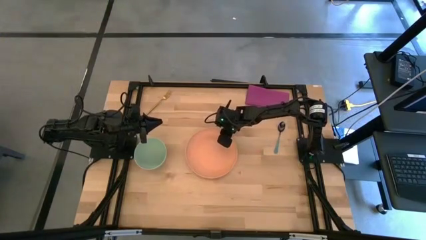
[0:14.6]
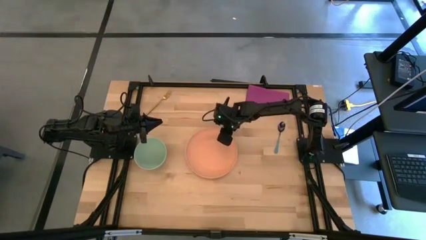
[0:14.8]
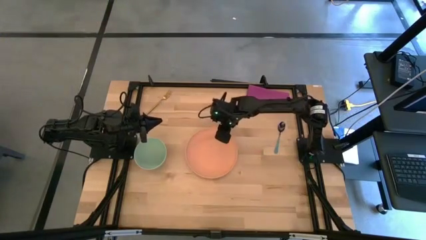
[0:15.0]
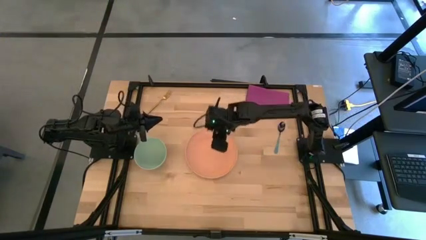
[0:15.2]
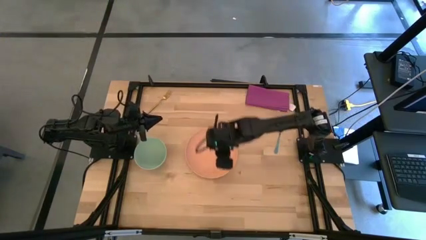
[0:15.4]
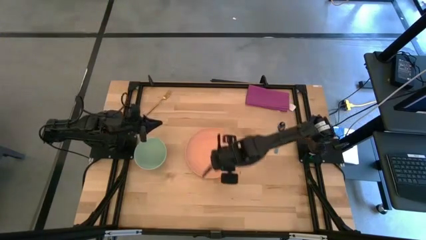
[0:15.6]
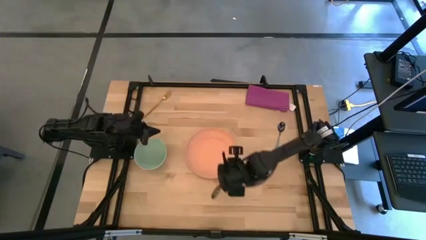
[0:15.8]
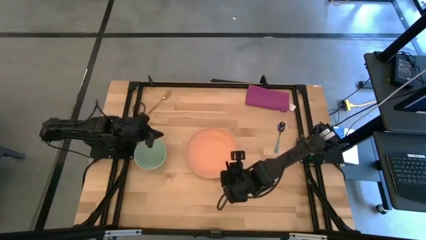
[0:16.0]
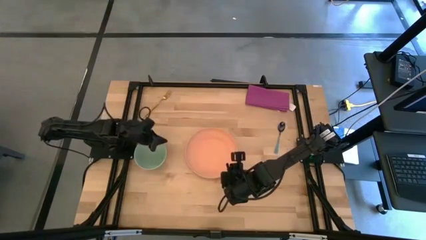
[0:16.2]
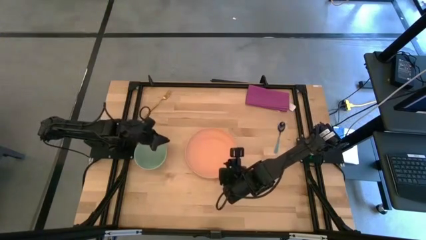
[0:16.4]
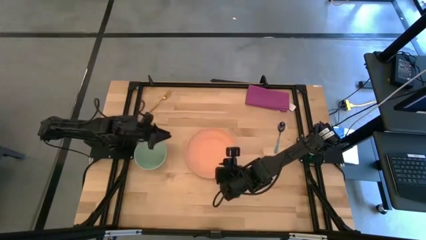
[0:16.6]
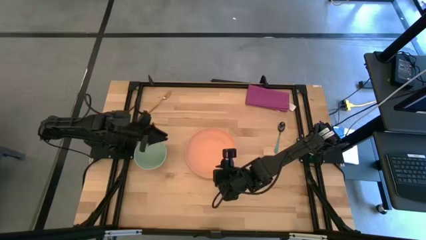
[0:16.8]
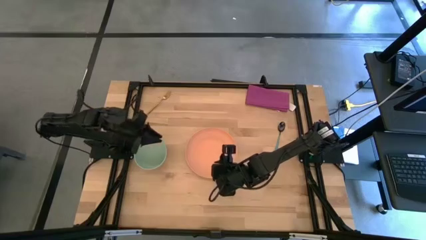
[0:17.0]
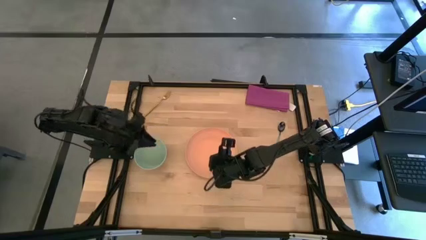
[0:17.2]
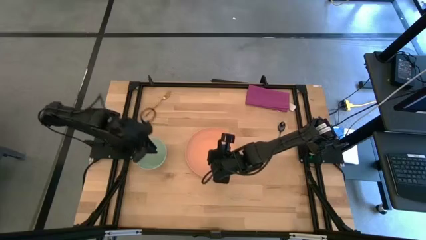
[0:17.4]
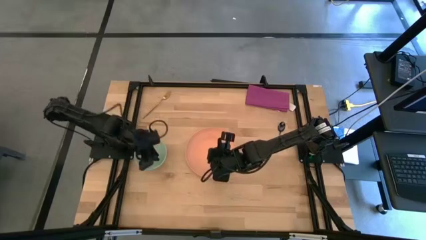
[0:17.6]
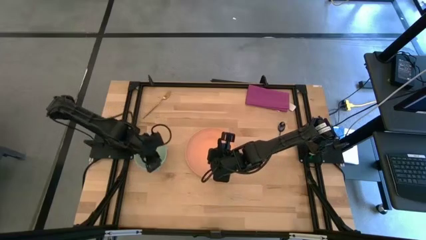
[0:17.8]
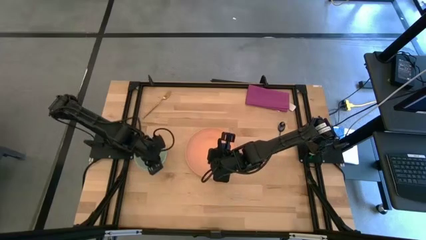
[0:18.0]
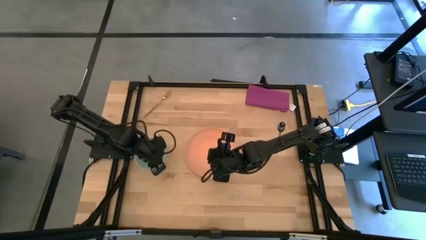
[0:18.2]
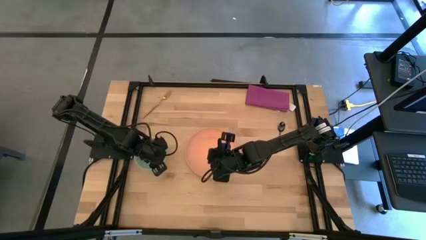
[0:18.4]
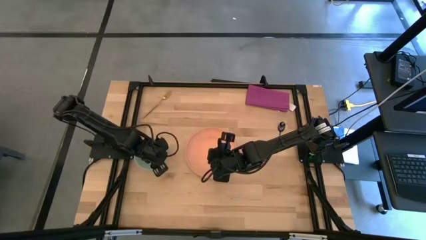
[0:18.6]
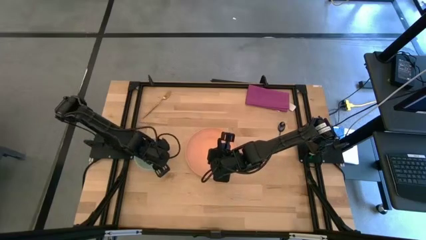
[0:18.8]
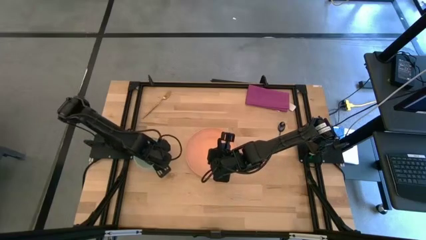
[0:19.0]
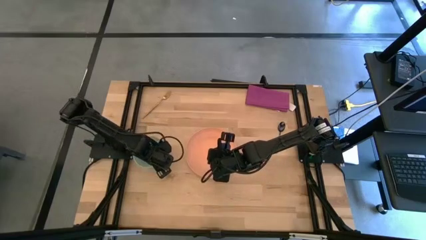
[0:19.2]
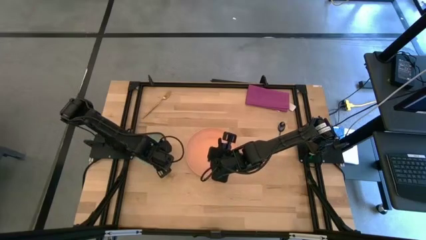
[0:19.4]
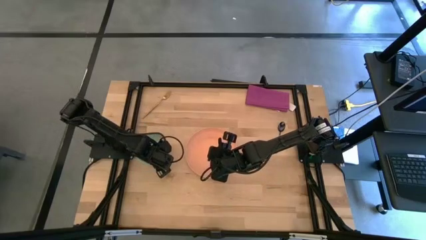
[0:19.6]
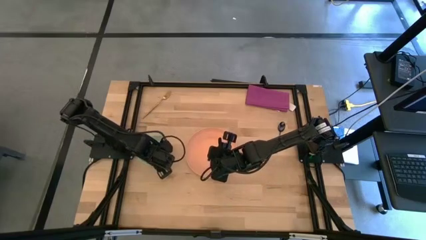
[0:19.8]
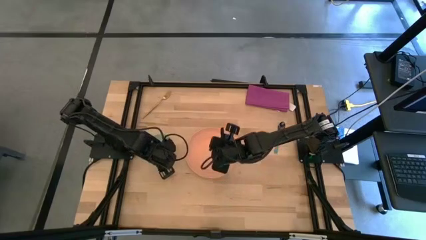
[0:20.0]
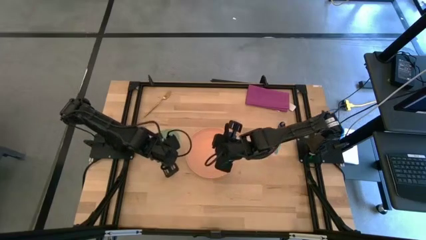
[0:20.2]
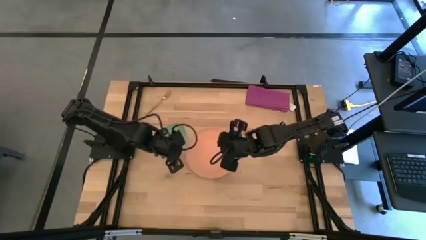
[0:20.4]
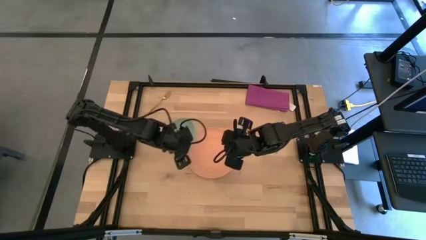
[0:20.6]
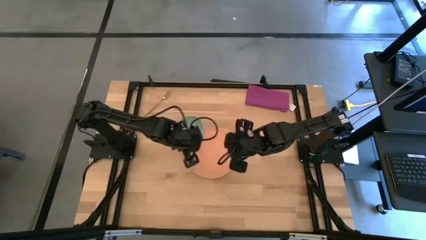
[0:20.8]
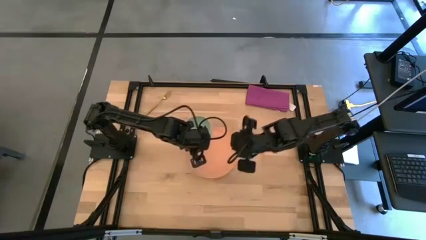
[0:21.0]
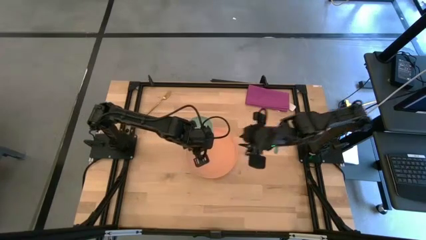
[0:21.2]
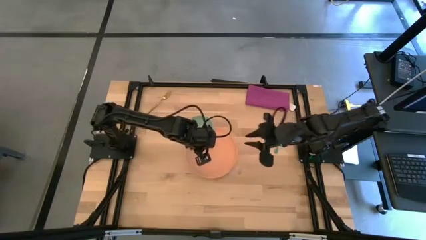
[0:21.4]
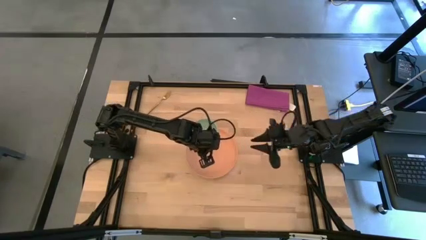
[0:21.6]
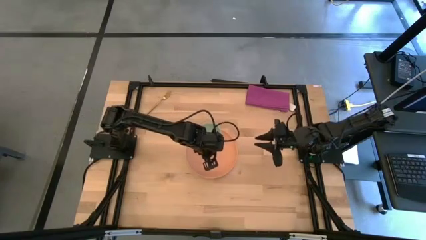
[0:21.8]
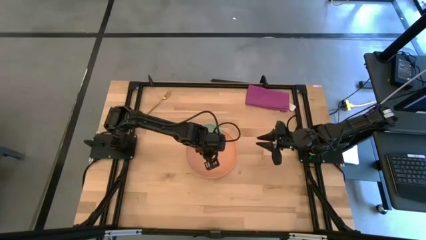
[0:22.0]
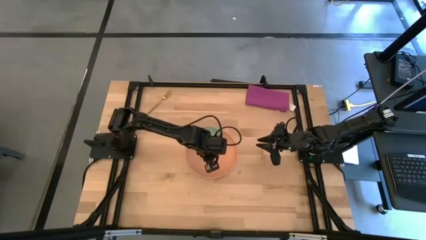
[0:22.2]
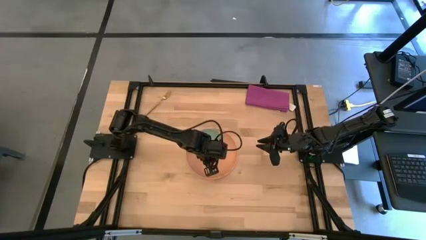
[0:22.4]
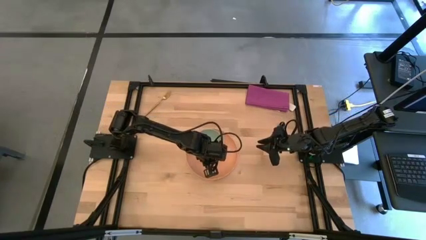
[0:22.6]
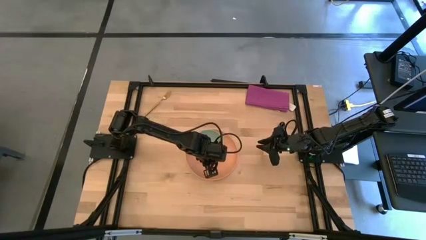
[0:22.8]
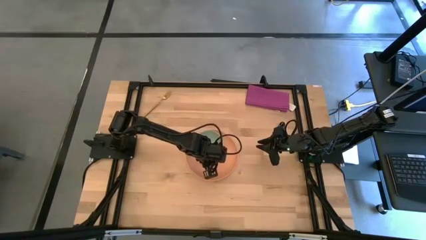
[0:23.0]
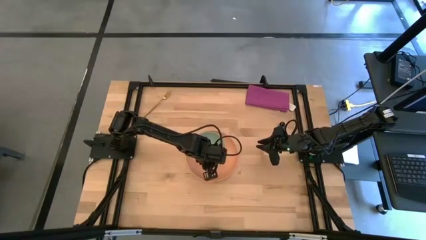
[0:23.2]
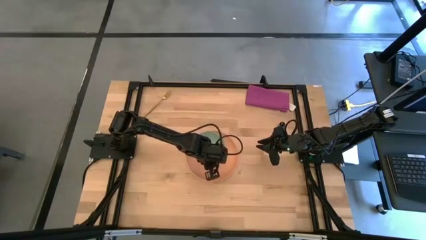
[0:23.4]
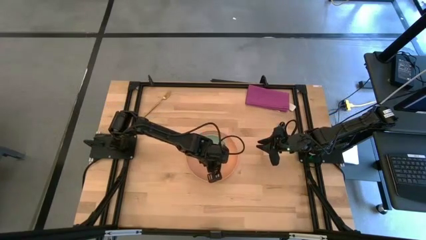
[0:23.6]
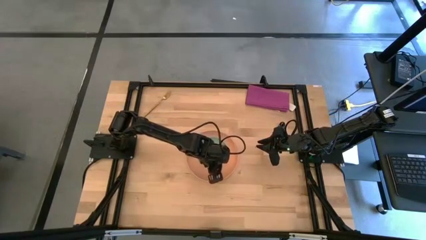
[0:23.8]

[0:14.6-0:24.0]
Task: Set table place
Put the green on the orange plate

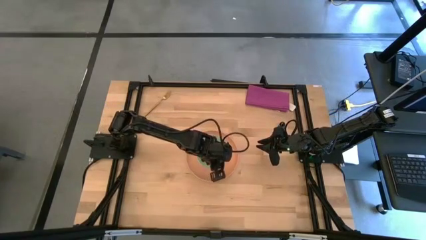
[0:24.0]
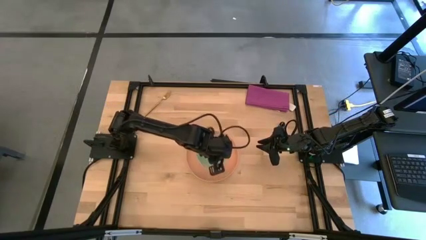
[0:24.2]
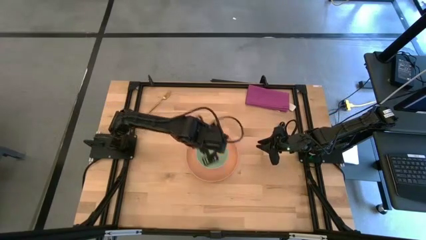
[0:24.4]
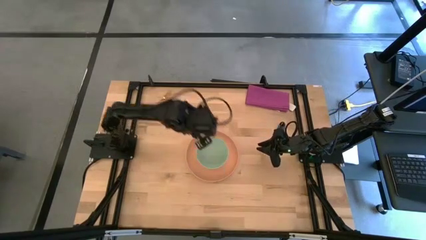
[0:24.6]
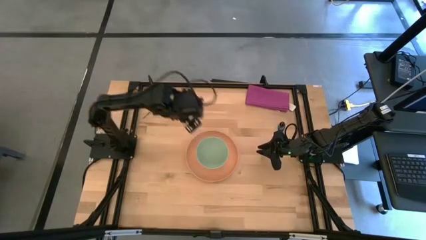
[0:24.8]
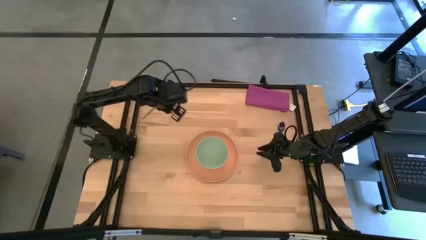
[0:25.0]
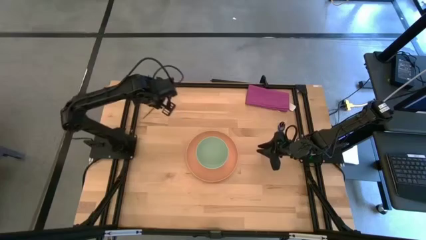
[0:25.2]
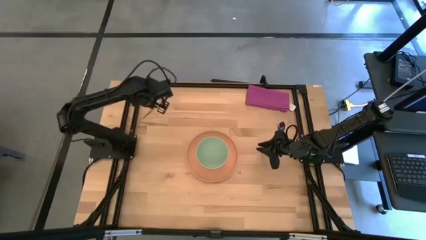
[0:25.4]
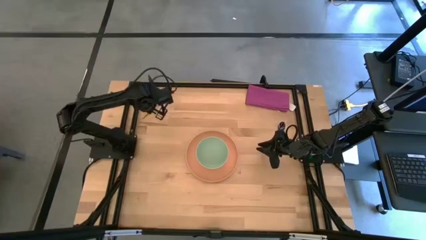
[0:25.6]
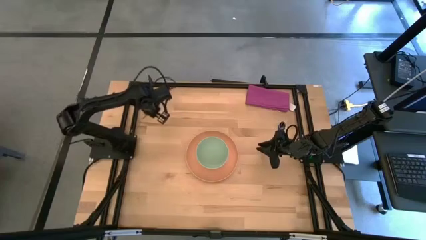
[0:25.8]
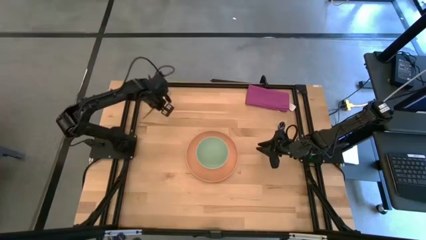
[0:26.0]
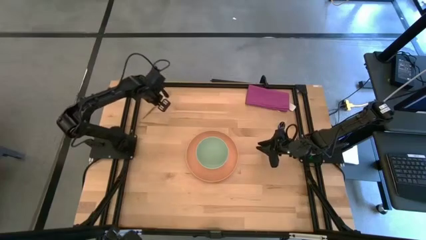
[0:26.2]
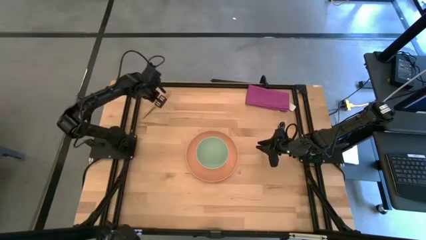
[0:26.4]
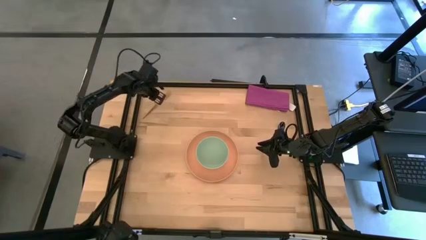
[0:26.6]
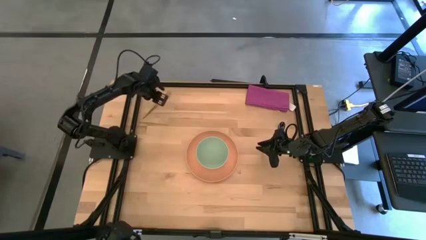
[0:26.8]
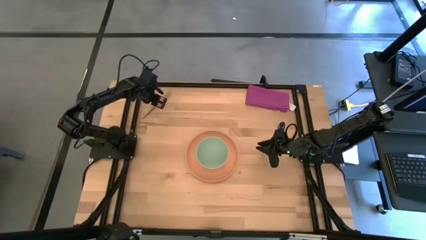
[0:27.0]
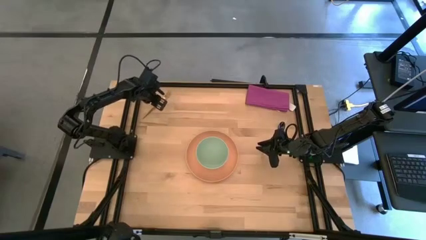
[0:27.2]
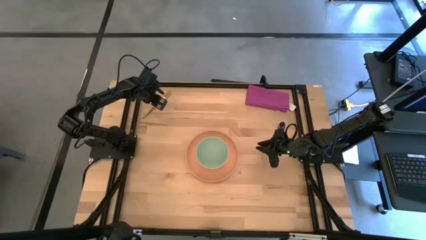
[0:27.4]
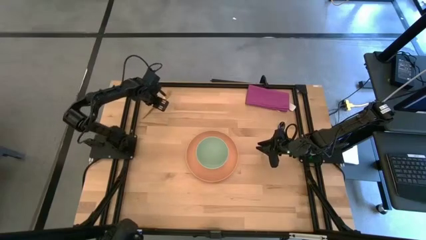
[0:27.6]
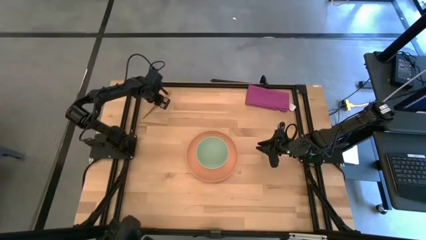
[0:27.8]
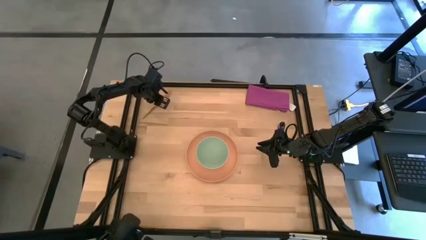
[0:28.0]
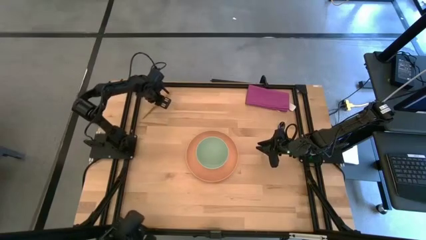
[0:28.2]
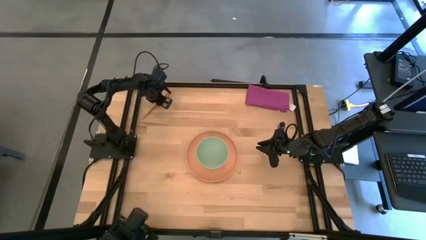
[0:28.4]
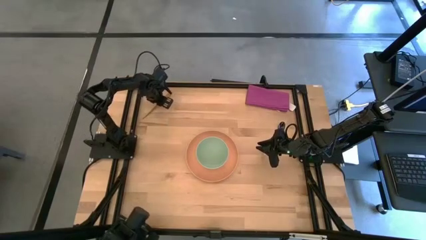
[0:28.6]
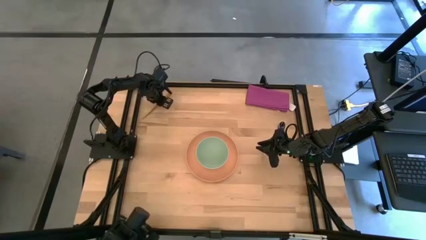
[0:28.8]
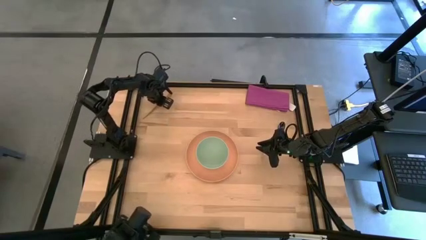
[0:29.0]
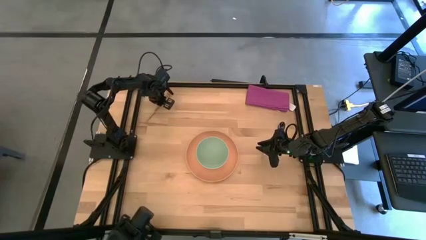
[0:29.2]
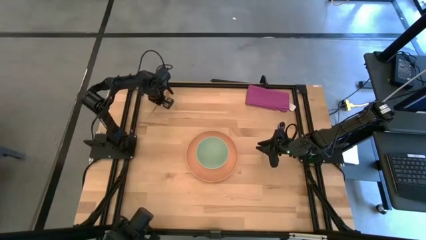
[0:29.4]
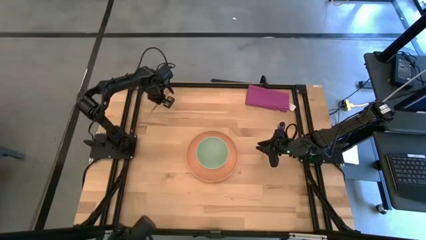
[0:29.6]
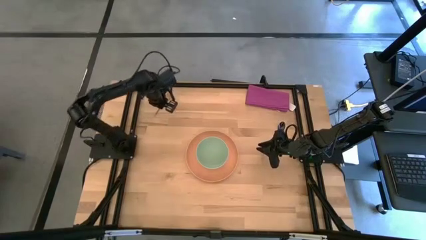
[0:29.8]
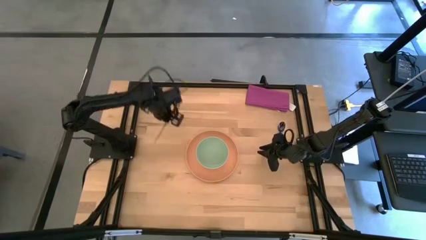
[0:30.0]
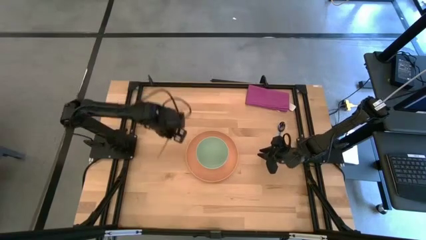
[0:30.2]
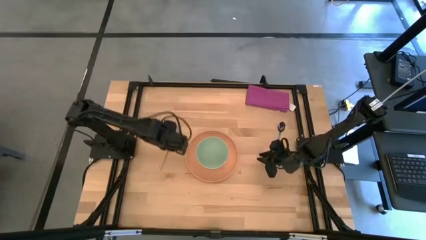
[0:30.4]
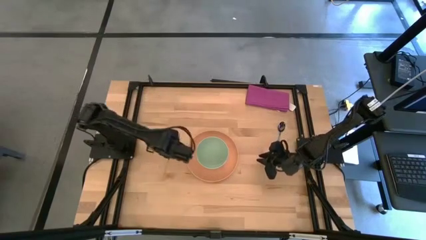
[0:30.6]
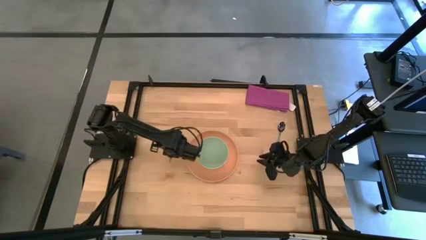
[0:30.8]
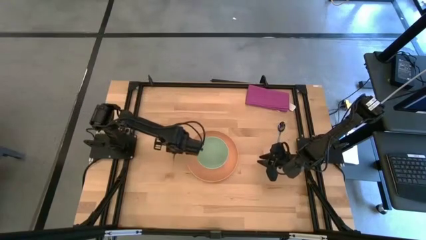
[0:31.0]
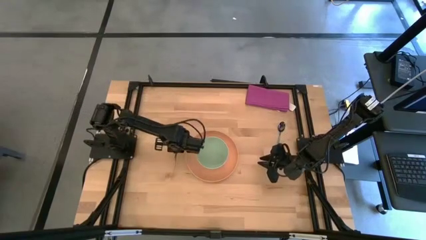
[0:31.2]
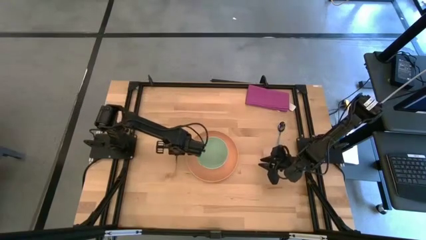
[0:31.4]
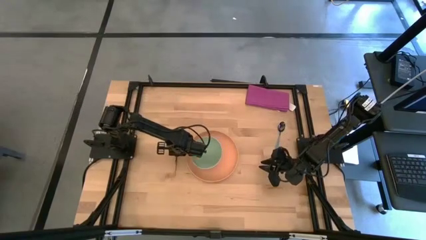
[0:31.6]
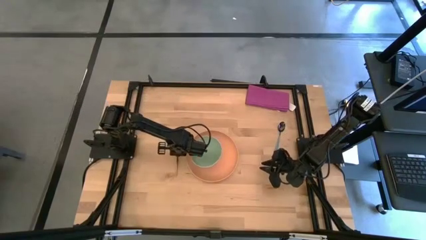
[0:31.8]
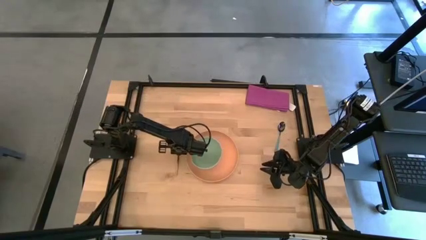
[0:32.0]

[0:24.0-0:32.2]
Put the golden fork on the left side of the orange plate
